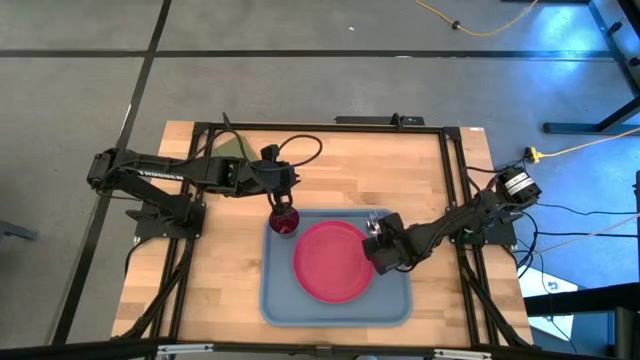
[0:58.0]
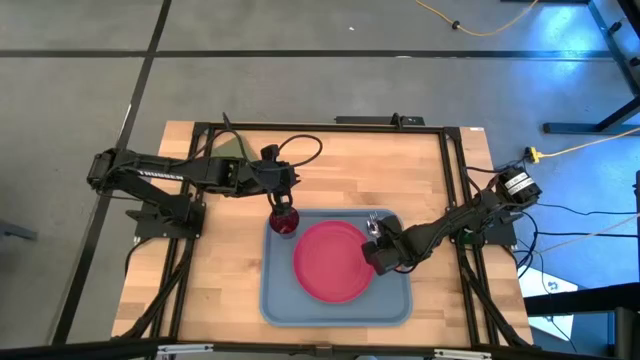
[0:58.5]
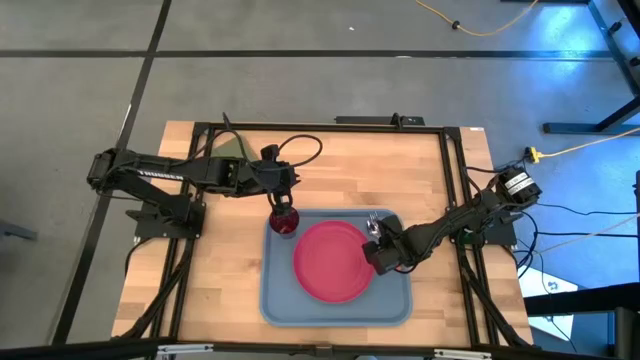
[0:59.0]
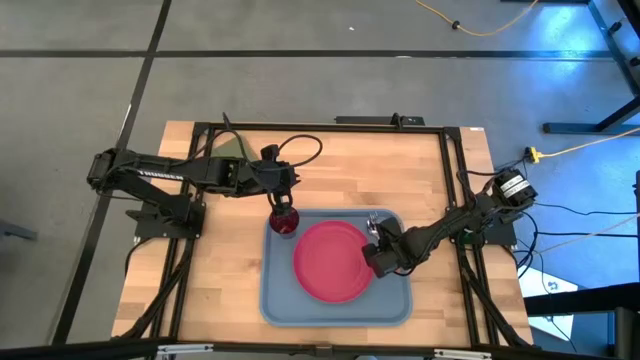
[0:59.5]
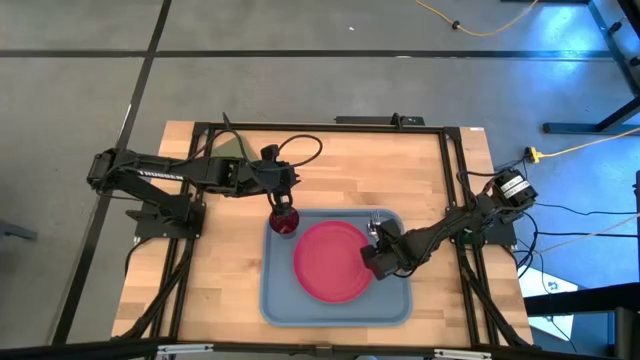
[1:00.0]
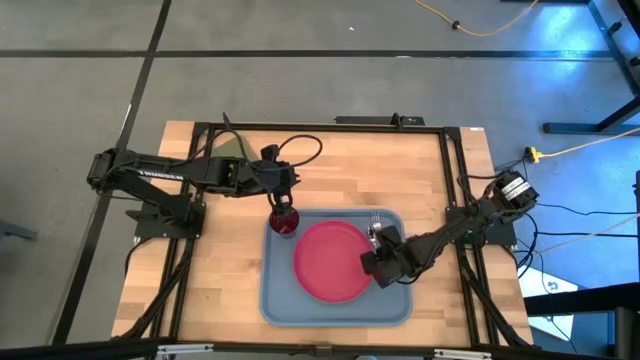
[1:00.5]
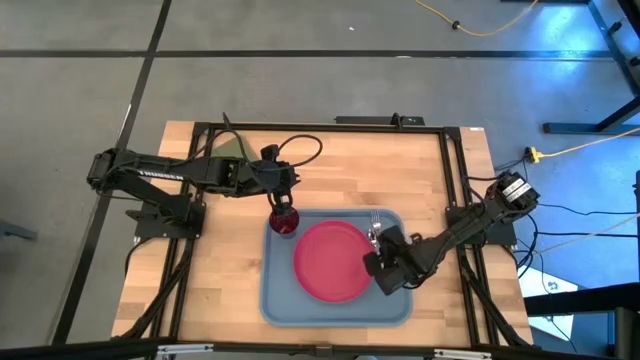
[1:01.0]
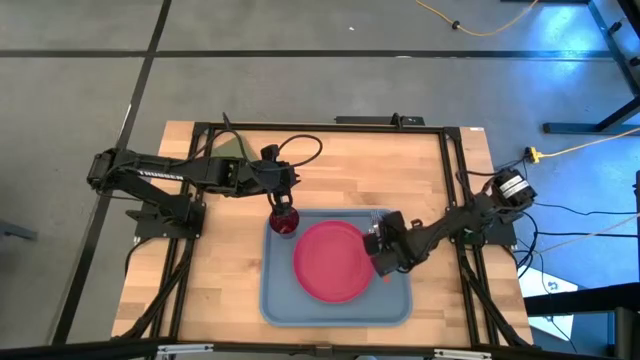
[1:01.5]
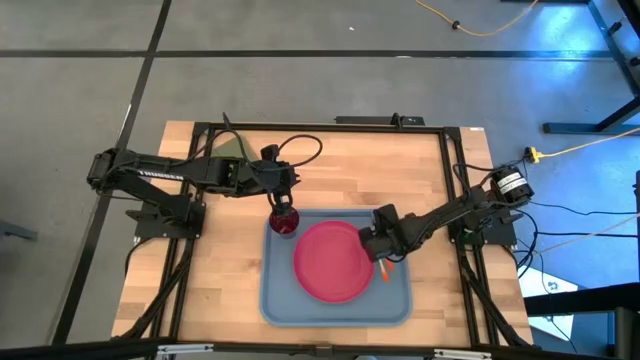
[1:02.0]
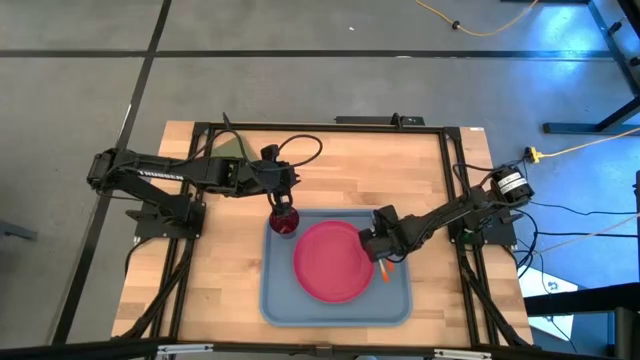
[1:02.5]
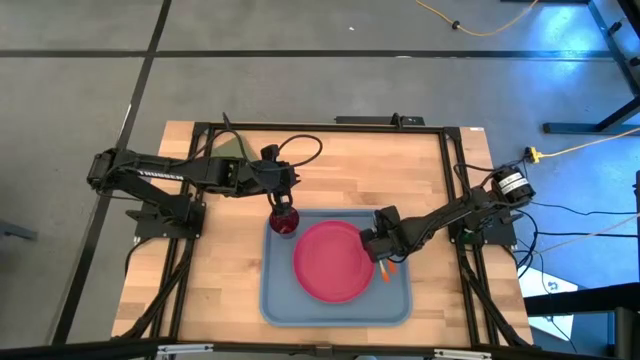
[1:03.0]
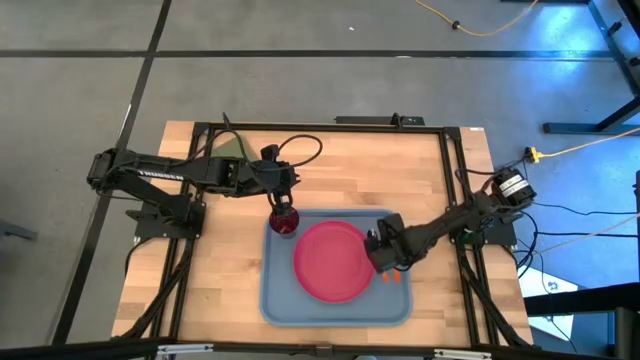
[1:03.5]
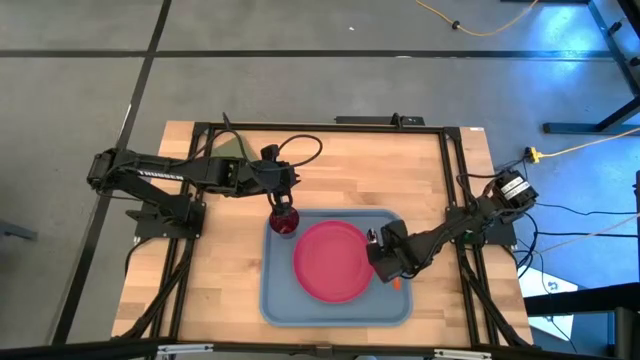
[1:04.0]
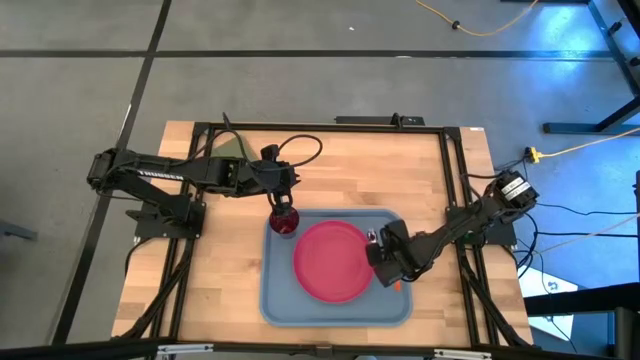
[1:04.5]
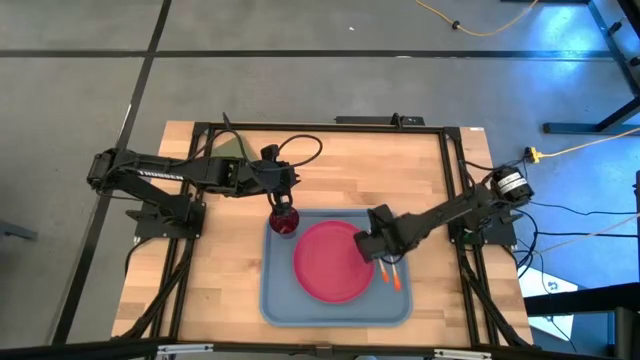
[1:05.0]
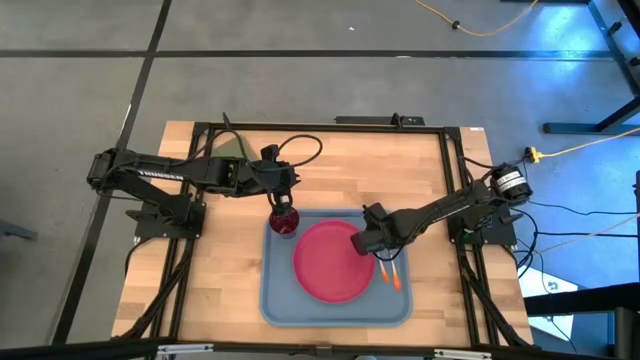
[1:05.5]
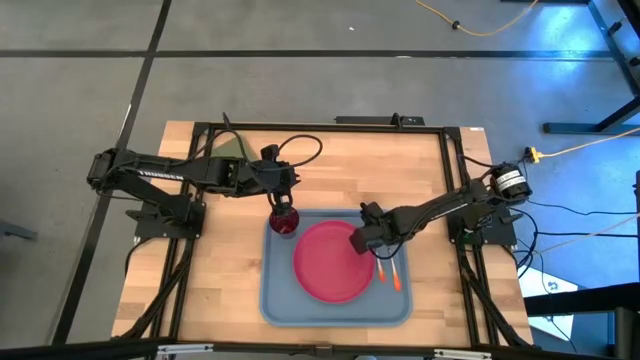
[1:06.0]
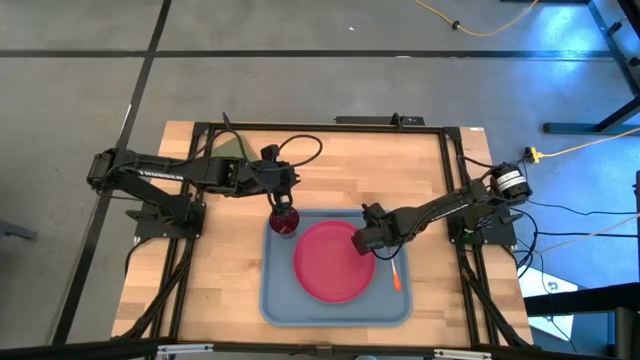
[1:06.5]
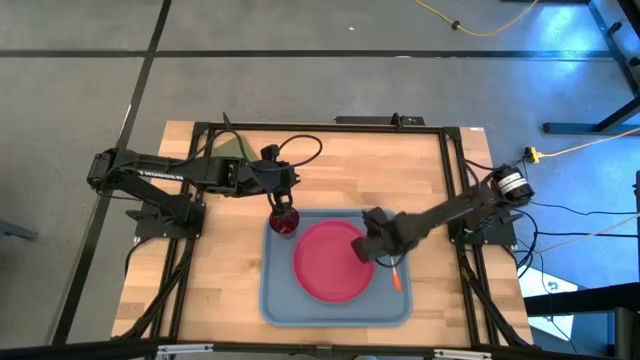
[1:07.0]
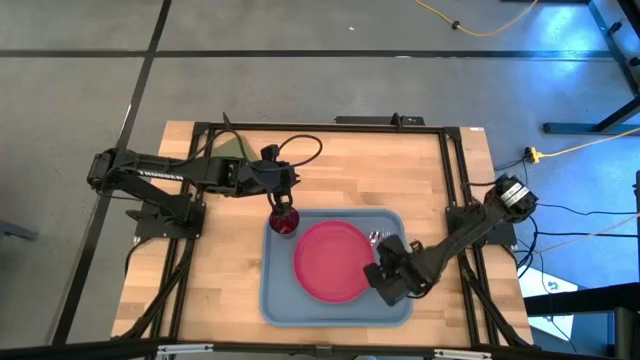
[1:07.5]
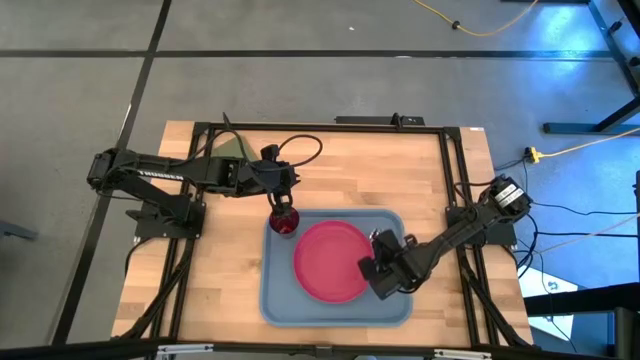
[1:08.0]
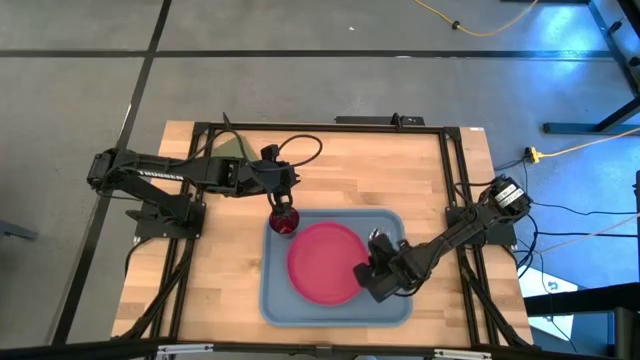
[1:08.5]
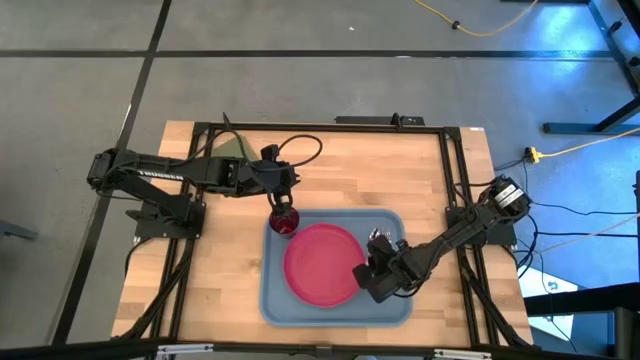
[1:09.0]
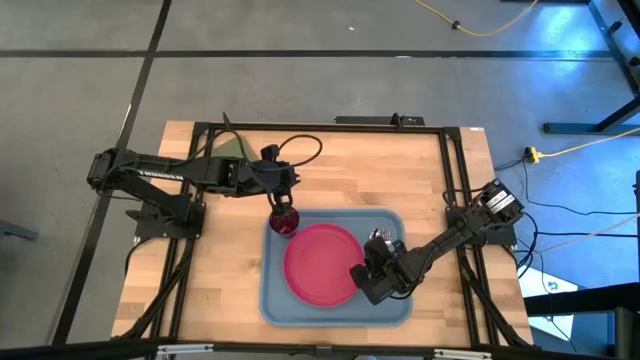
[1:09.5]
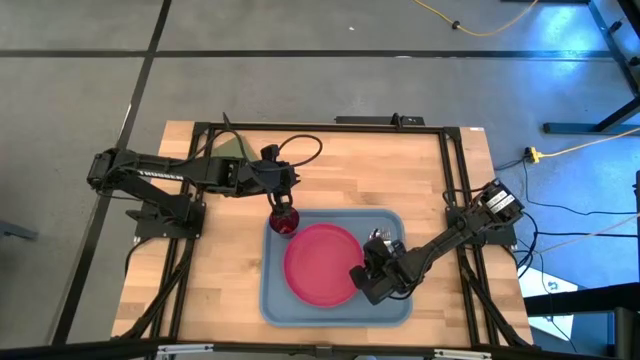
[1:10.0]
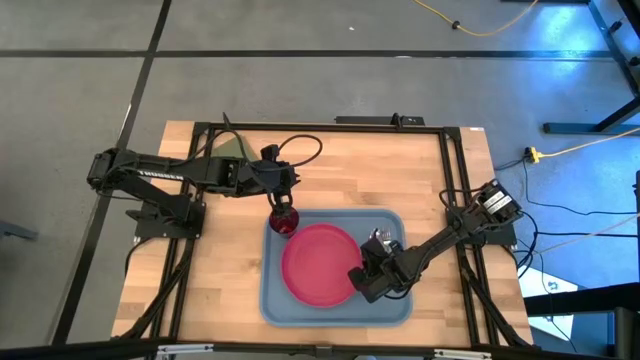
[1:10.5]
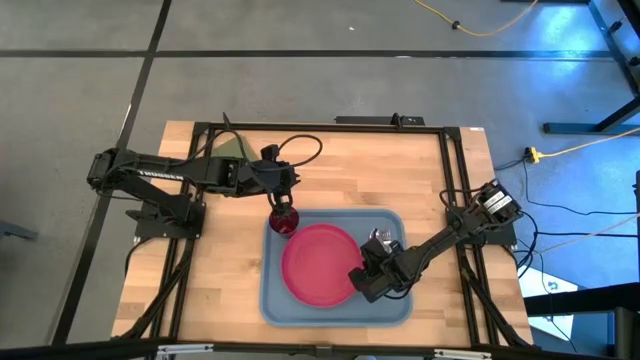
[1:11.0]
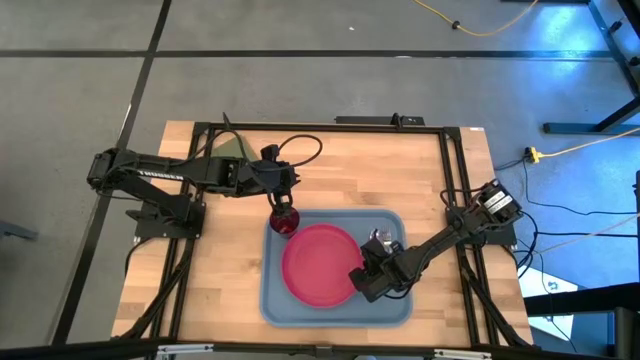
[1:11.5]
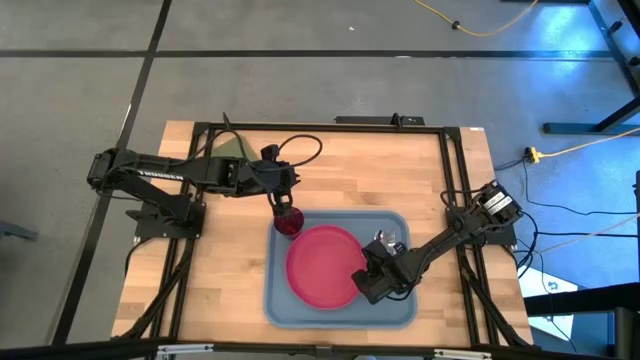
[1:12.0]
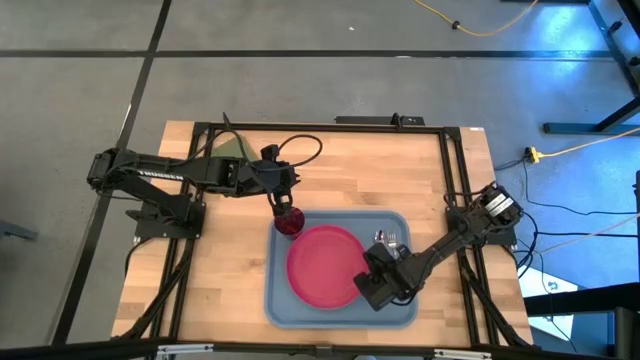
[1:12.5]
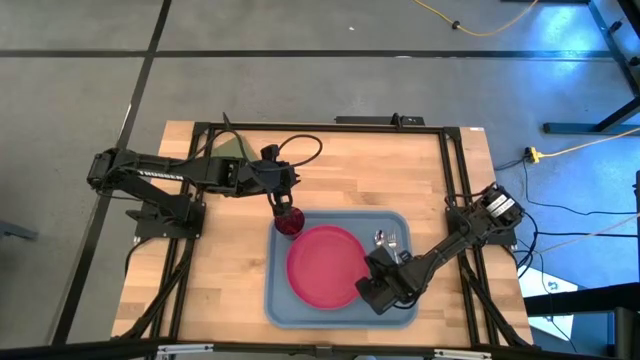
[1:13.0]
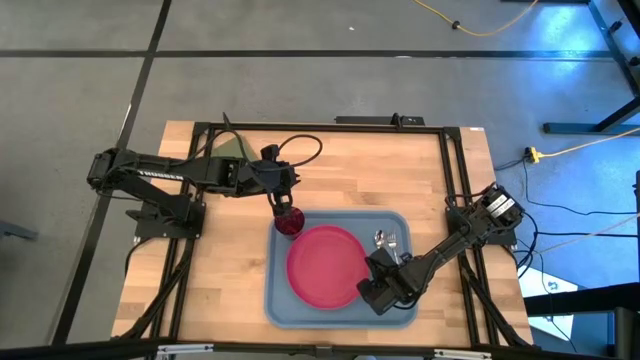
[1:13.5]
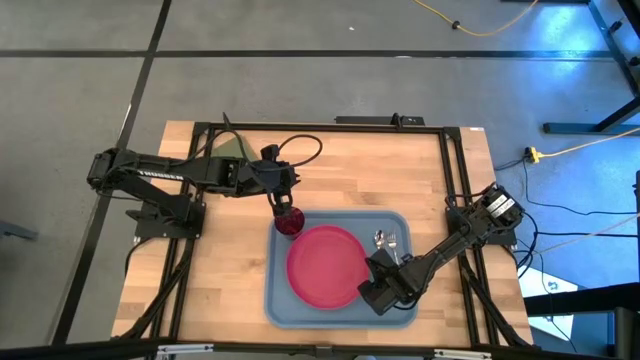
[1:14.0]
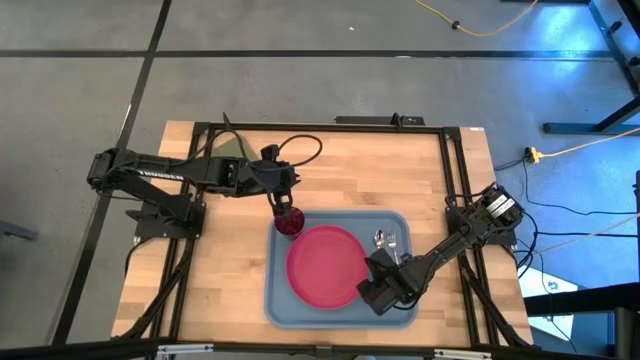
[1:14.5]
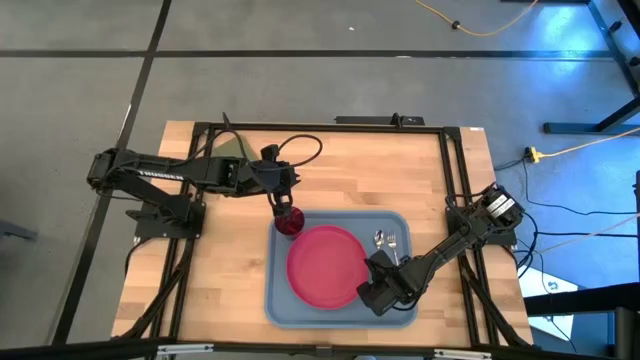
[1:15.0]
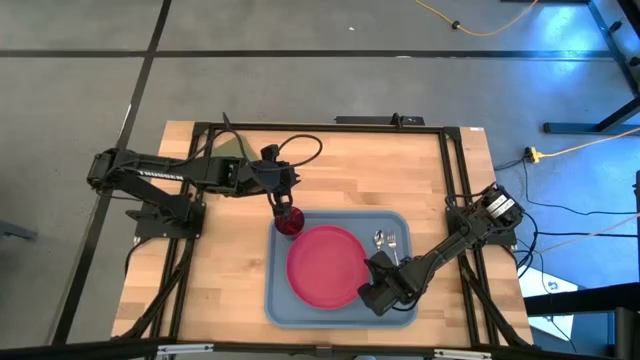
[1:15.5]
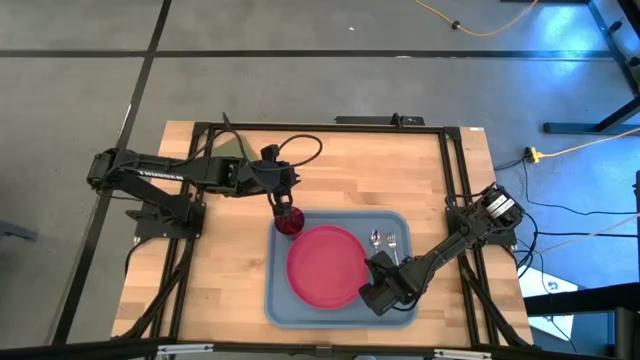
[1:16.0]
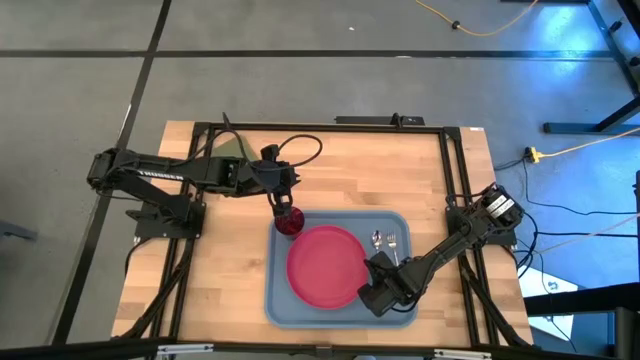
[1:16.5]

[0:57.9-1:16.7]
Task: Pick and place plate/cup/fork/spoon on tray
Adjust the orange spoon and fork

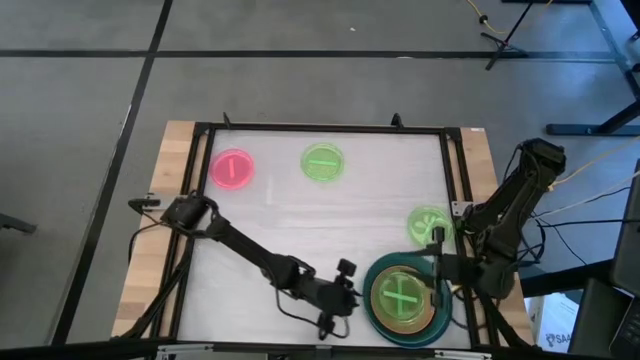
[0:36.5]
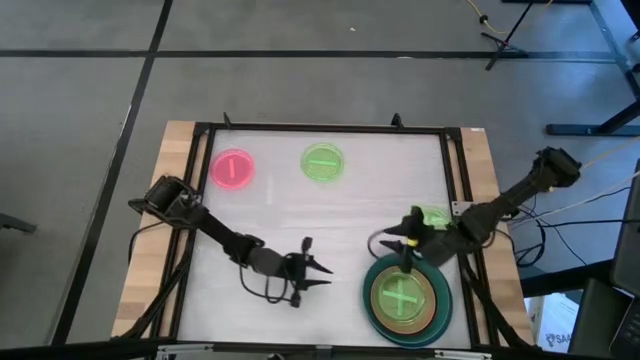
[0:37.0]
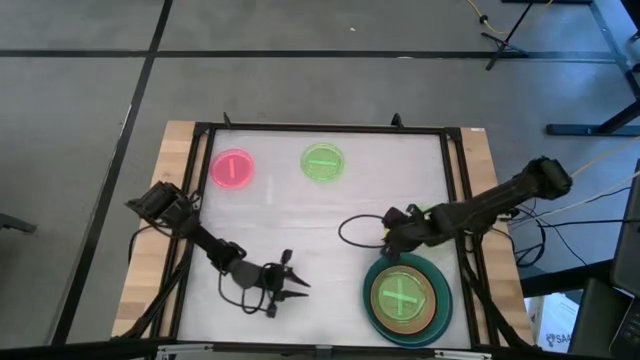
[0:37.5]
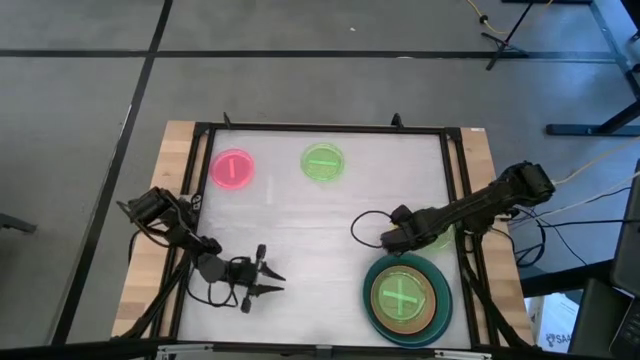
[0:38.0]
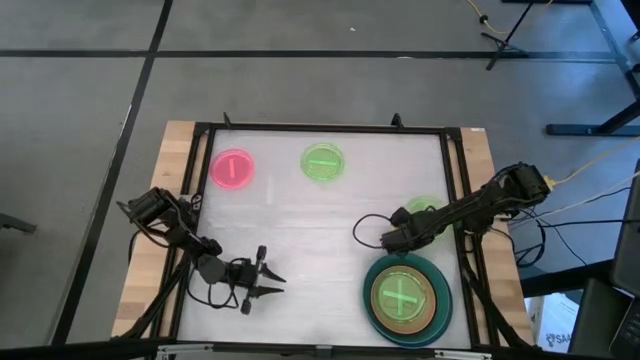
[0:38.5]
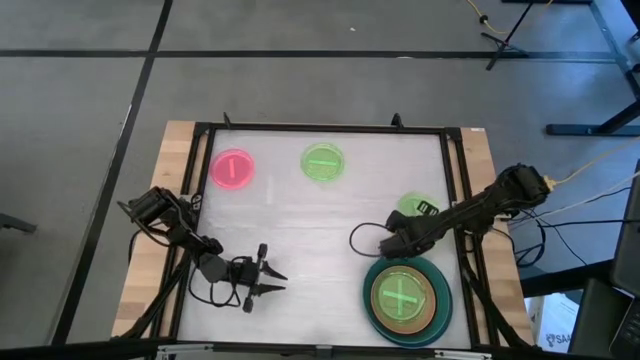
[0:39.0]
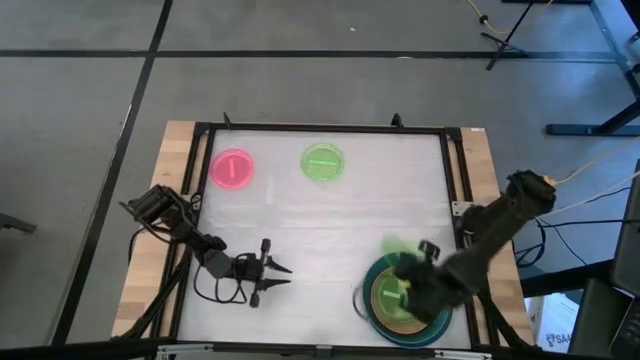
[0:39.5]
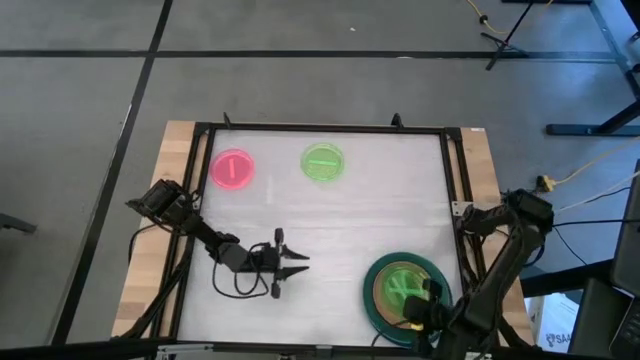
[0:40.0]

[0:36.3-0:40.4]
Task: Stack plastic plates
Stack the green plate on top of the green plate
